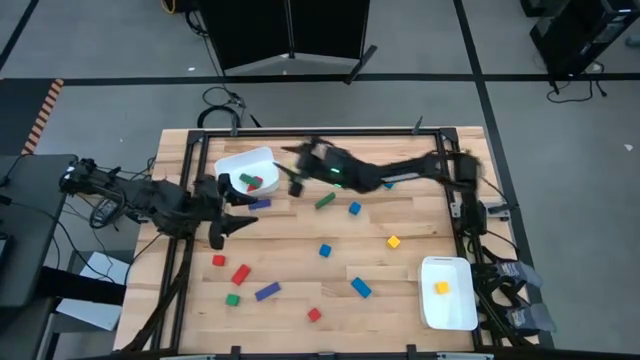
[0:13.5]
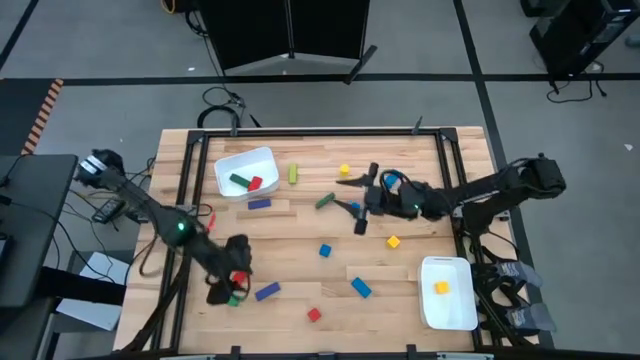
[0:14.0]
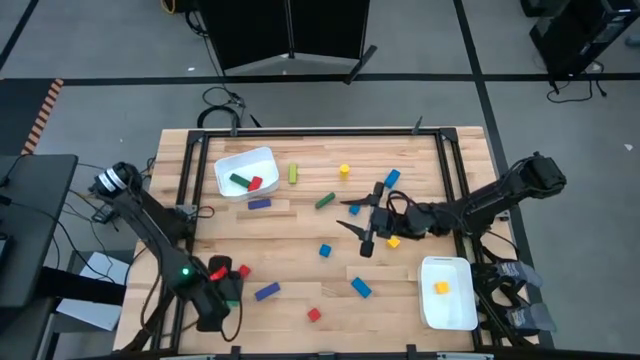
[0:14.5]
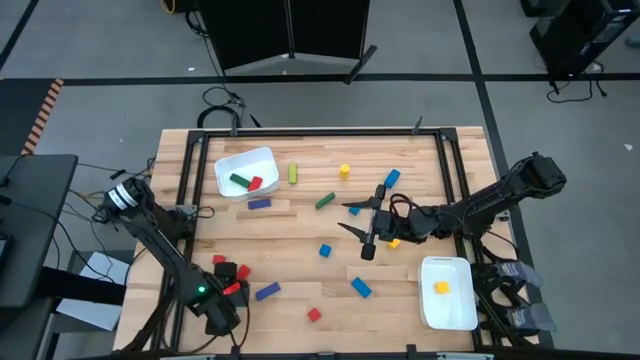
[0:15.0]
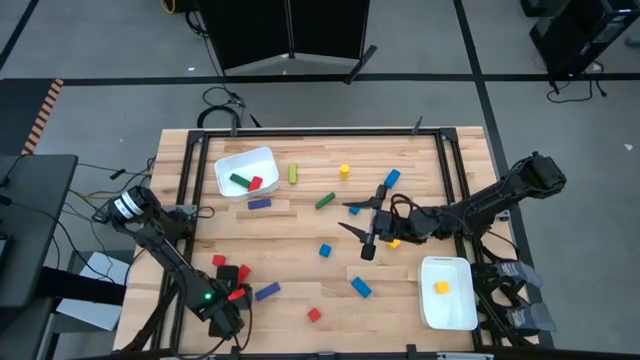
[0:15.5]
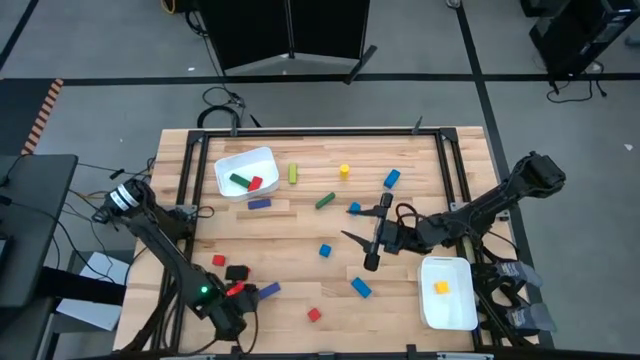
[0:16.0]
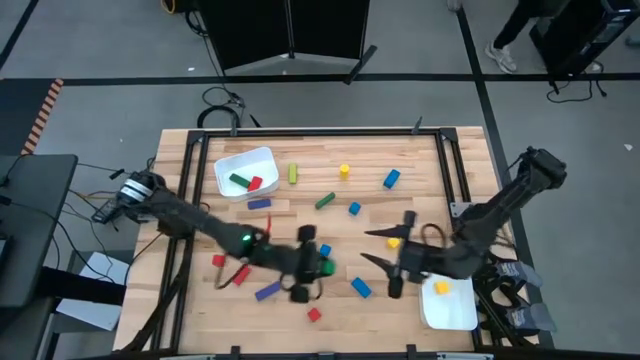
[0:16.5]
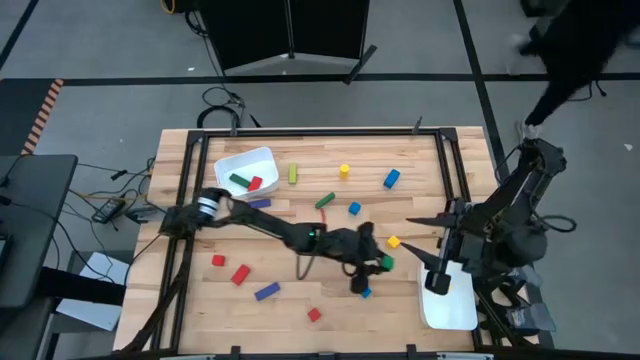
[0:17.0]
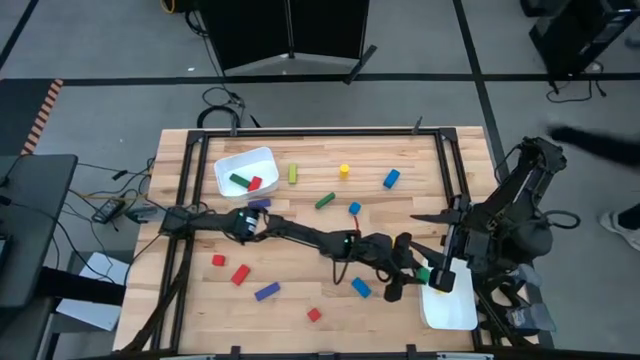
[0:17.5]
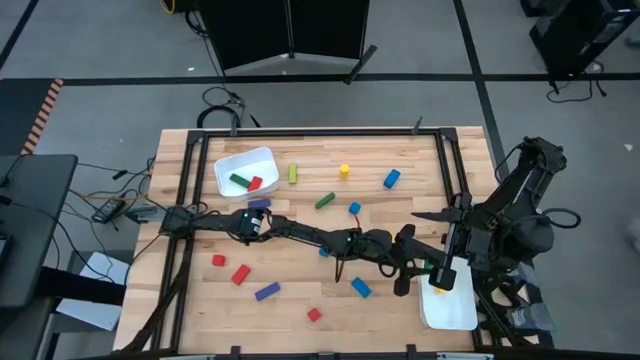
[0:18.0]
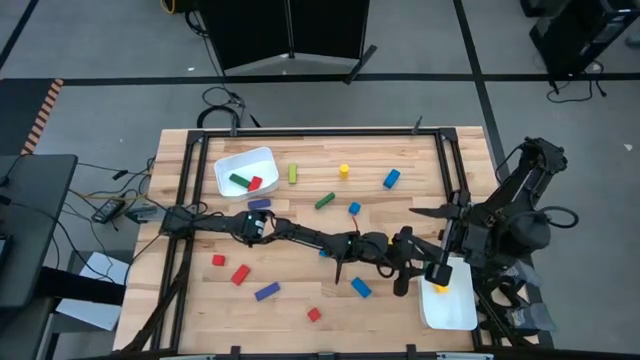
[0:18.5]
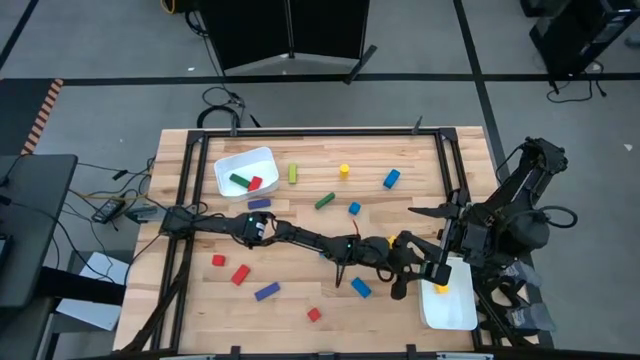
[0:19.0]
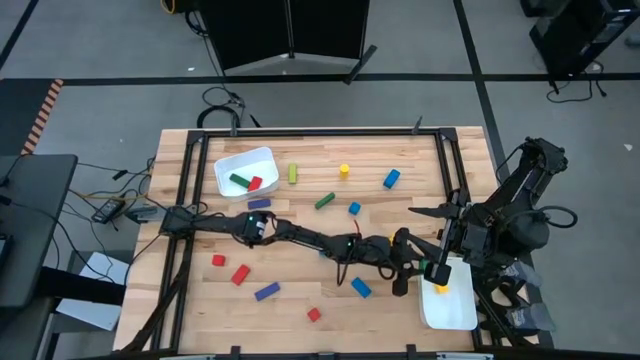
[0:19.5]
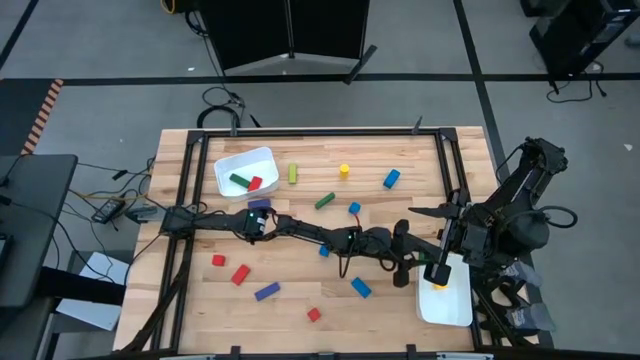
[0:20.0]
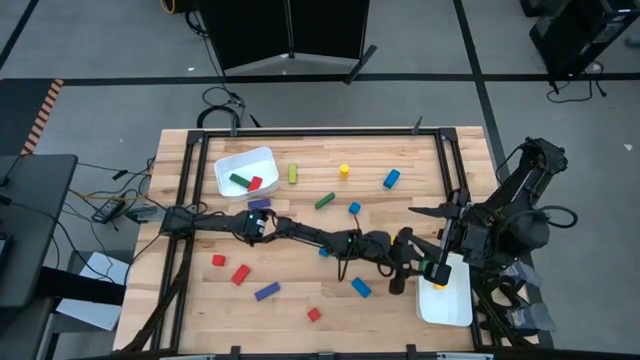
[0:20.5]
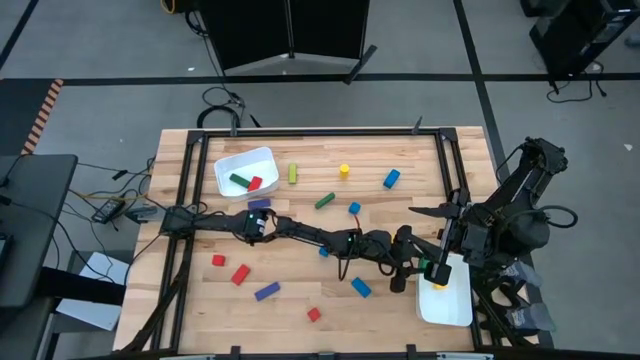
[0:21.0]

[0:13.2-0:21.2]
Task: Sort blocks by size
Put the small green block into the bottom white bin

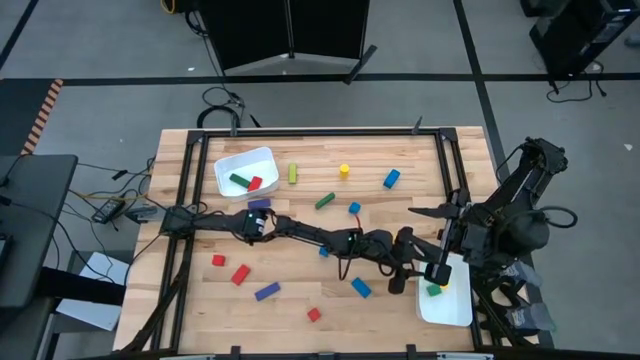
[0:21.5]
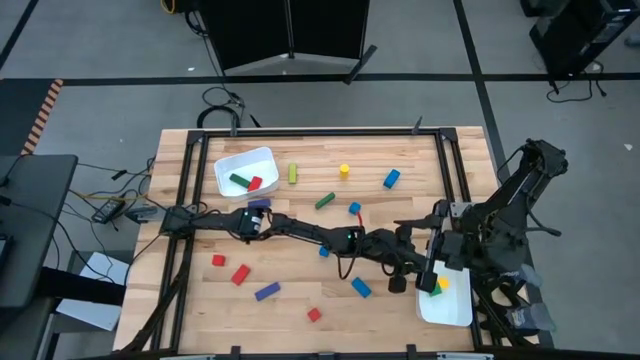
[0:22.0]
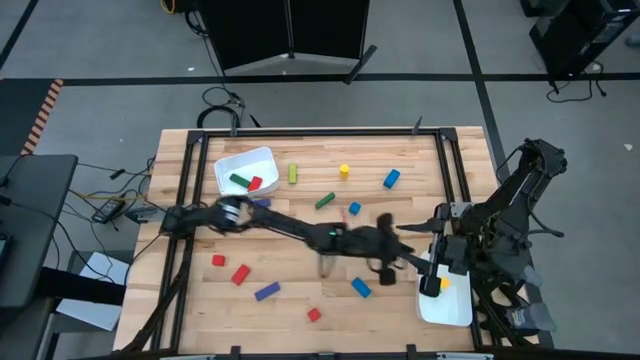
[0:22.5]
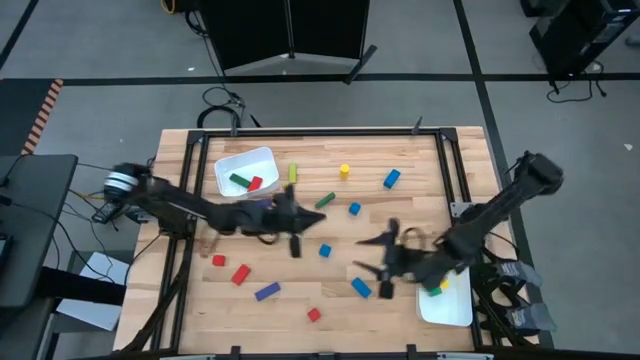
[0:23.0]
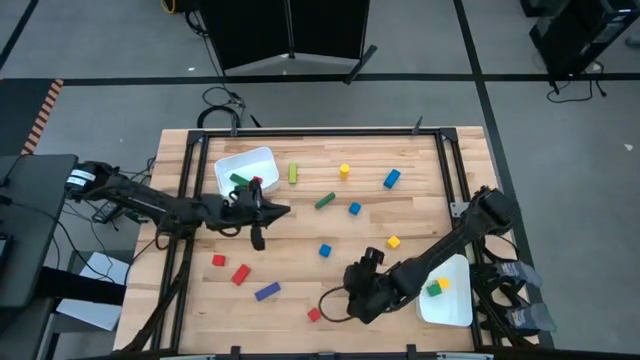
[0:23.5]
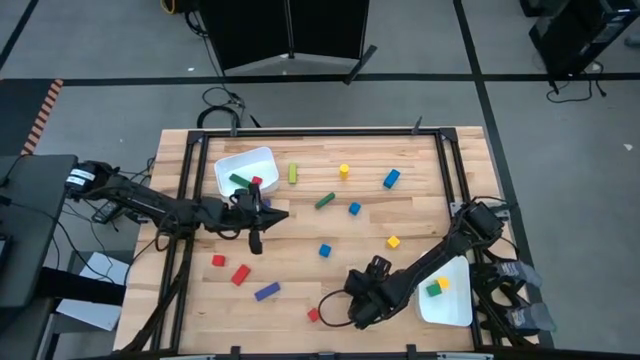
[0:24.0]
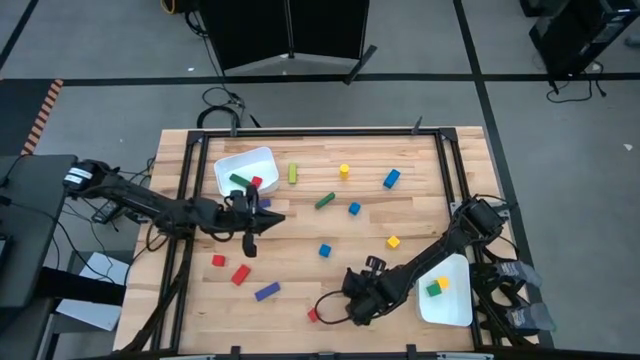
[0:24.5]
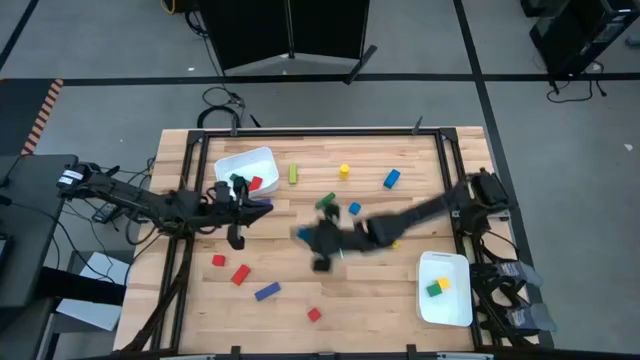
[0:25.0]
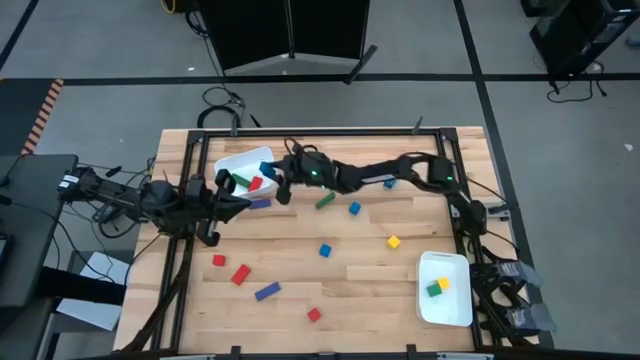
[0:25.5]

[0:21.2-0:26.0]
Put the large blue block into the top white bin

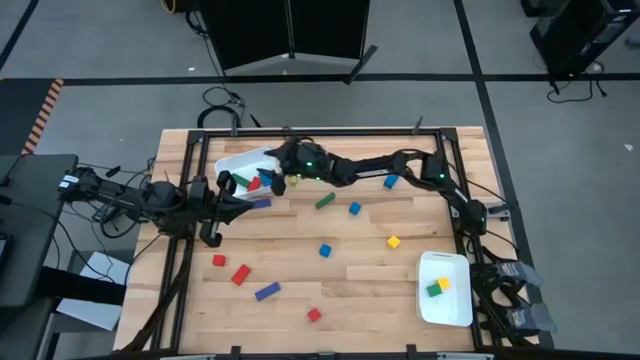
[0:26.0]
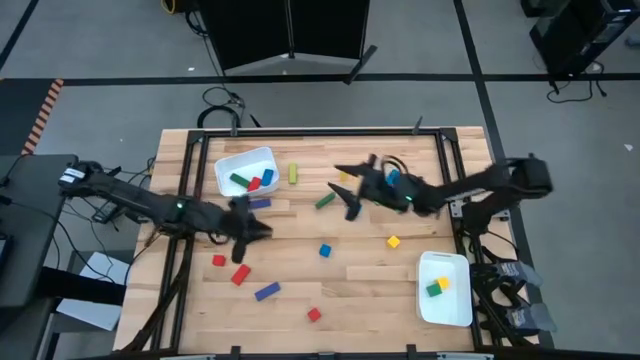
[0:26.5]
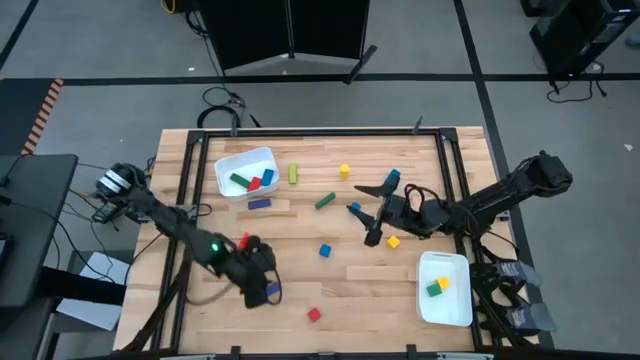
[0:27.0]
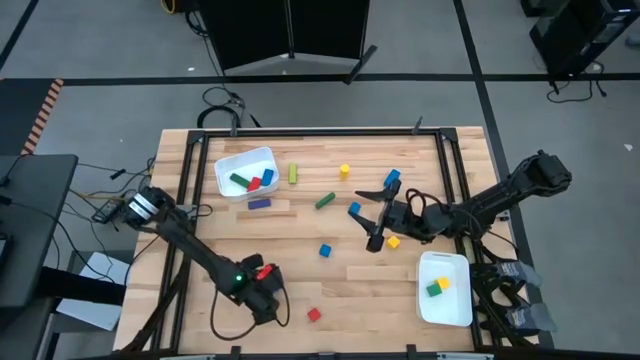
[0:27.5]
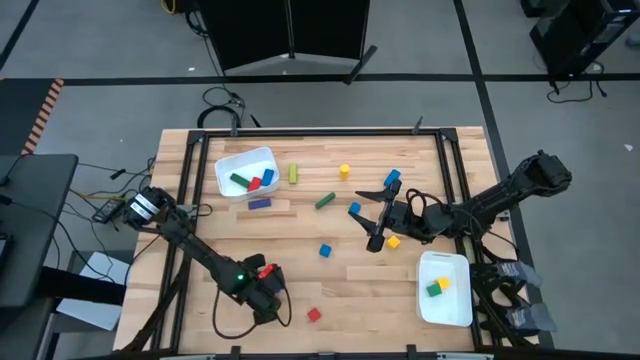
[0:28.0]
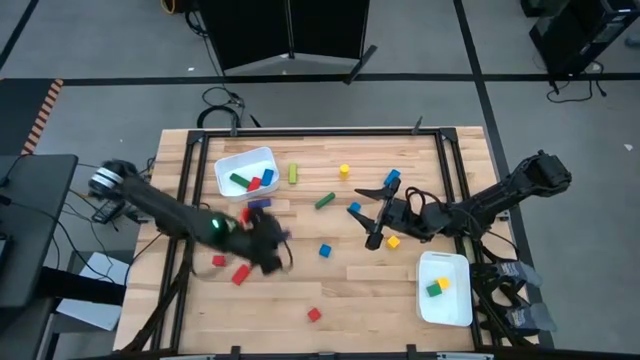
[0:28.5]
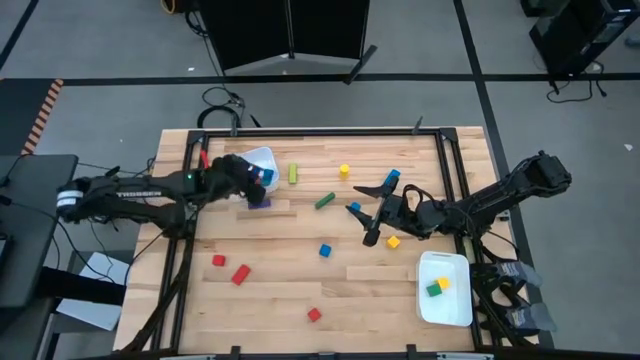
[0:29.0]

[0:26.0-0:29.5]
Put the large blue block into the top white bin

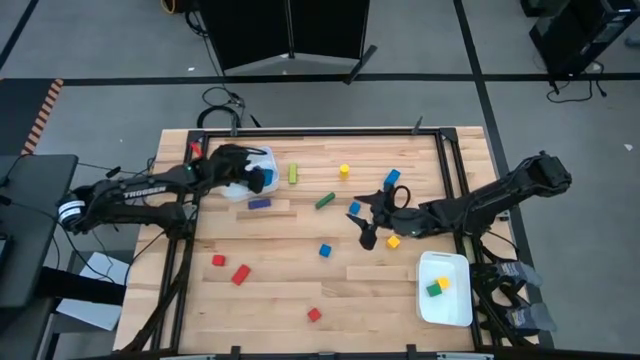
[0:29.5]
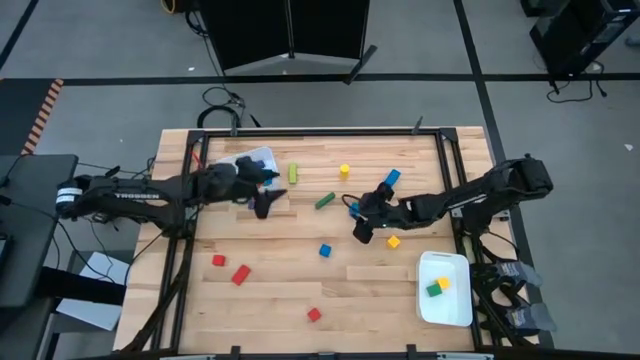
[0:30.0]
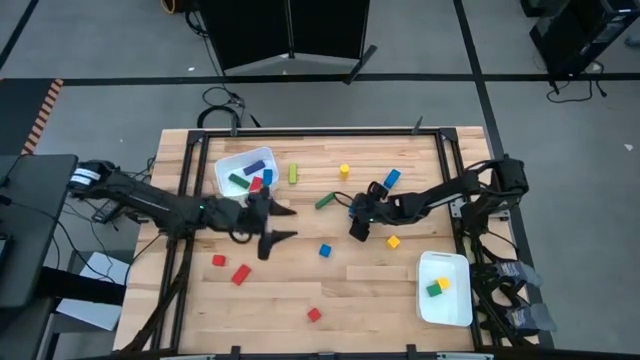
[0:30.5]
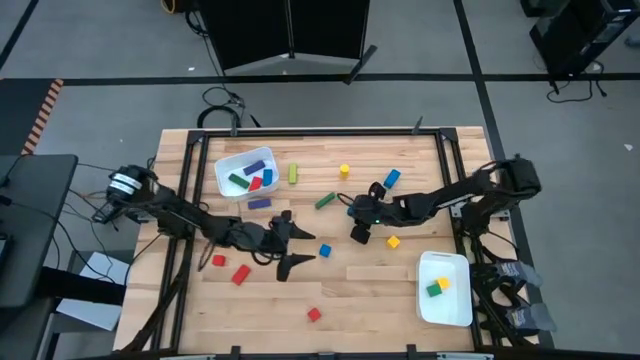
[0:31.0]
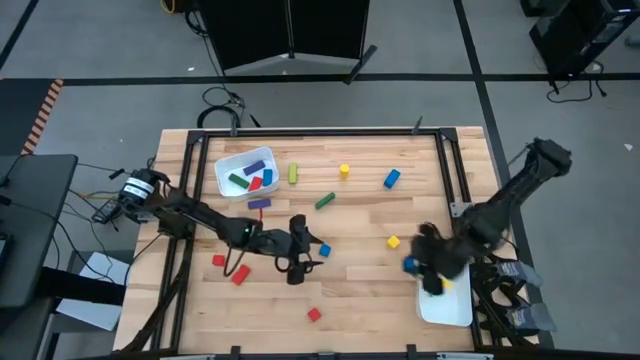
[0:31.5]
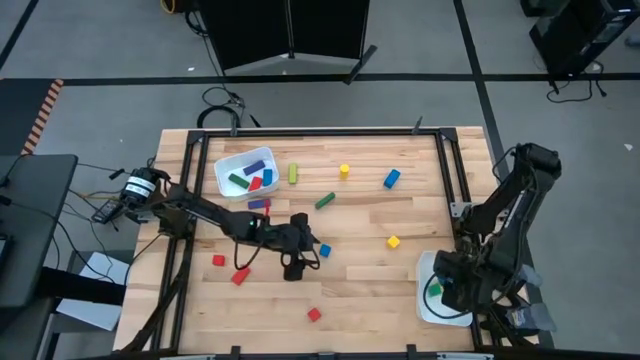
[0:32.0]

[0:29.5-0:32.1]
Put the small blue block into the bottom white bin

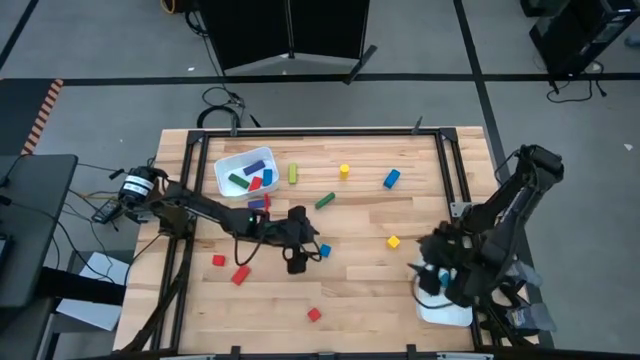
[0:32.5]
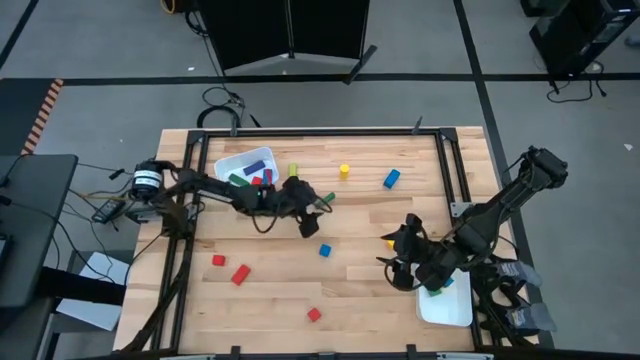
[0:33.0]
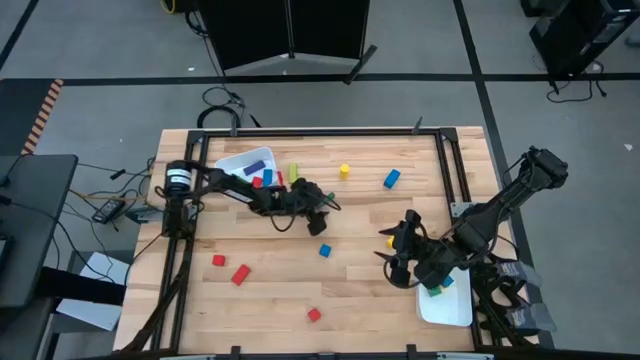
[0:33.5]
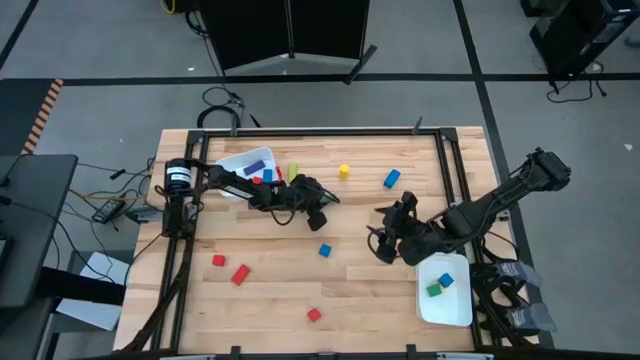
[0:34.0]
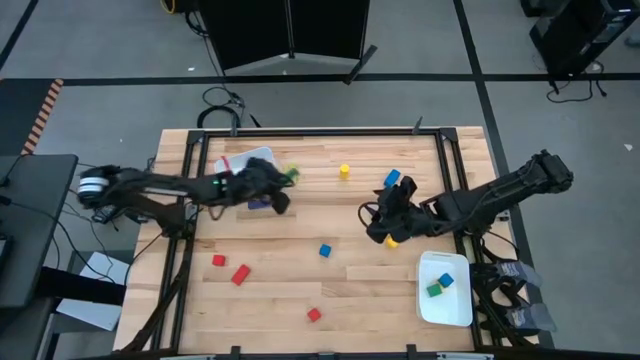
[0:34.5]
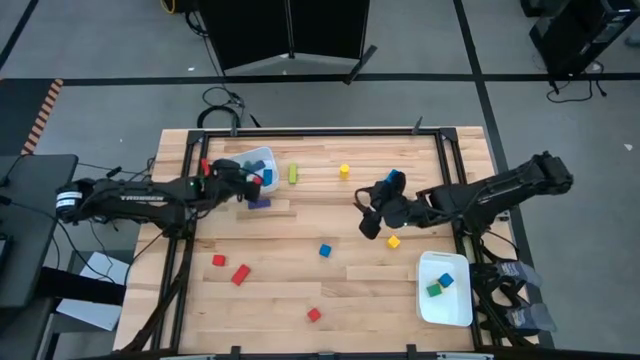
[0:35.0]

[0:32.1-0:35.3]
Put the large green block into the top white bin
